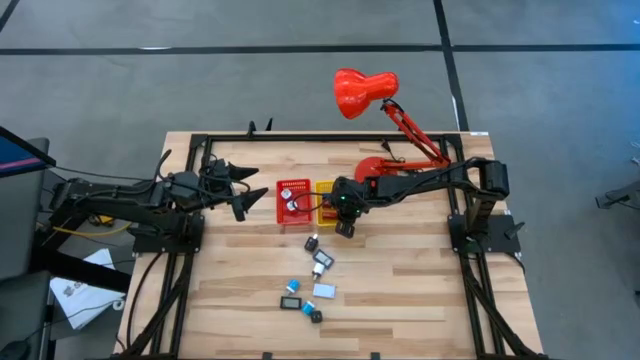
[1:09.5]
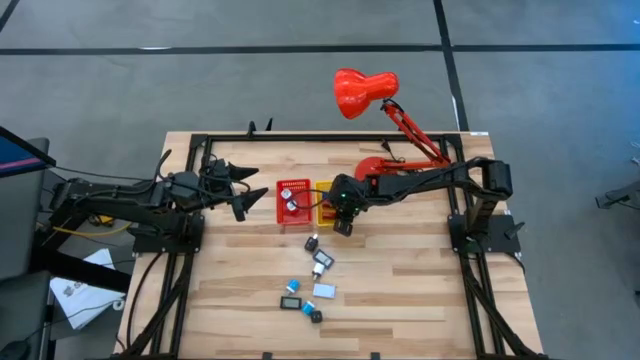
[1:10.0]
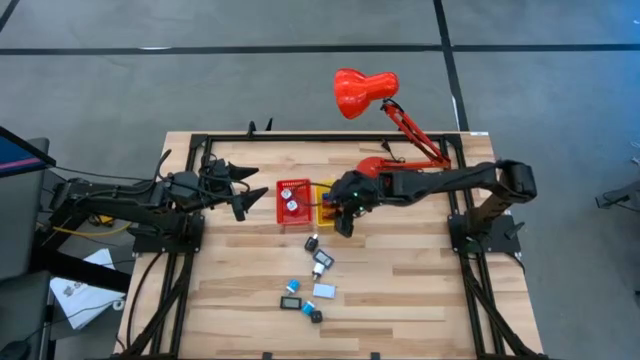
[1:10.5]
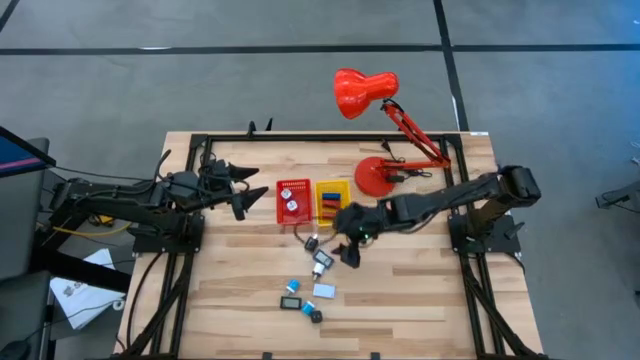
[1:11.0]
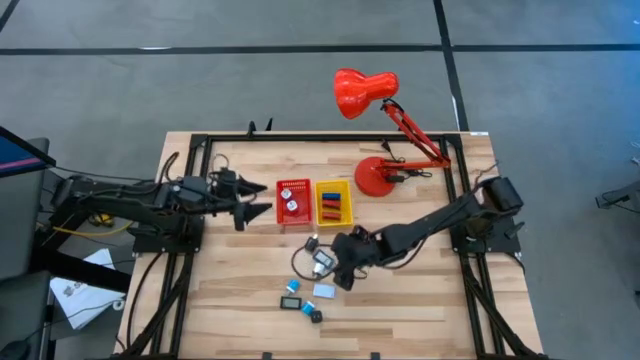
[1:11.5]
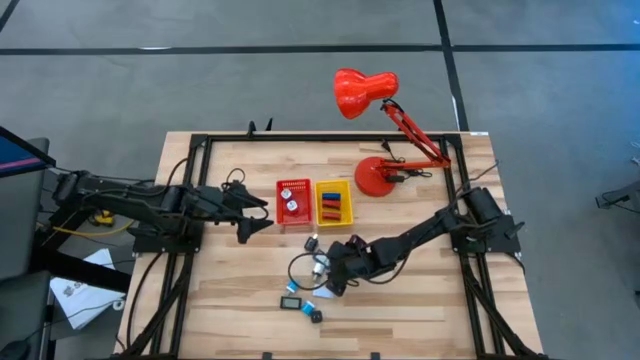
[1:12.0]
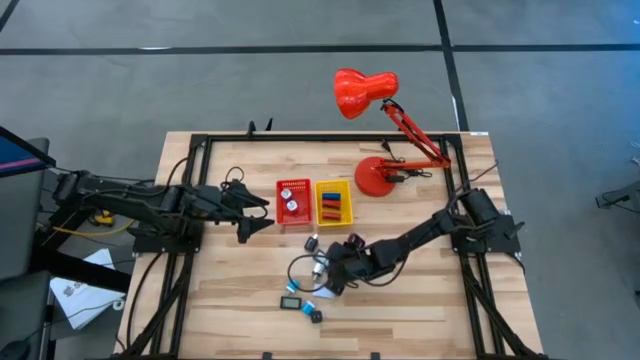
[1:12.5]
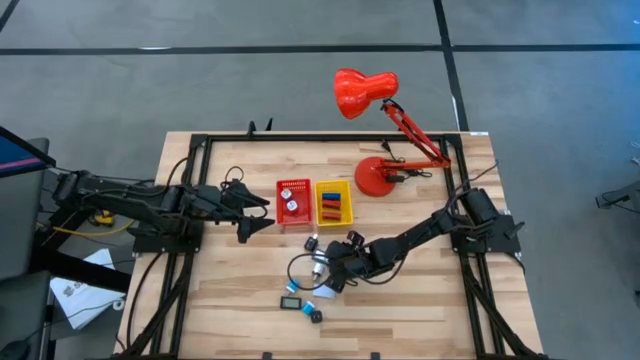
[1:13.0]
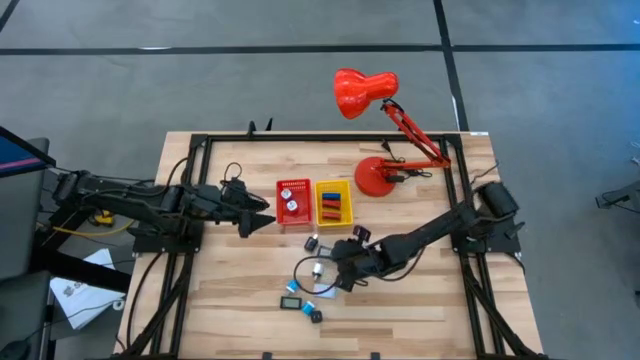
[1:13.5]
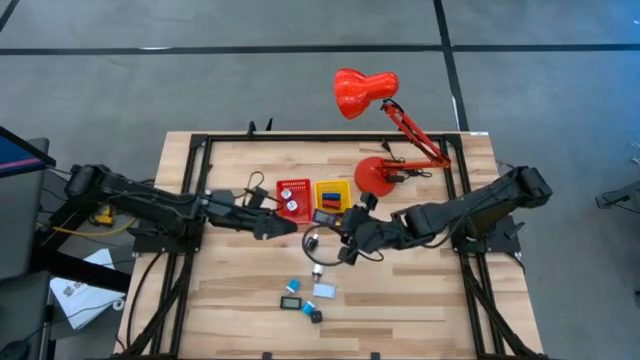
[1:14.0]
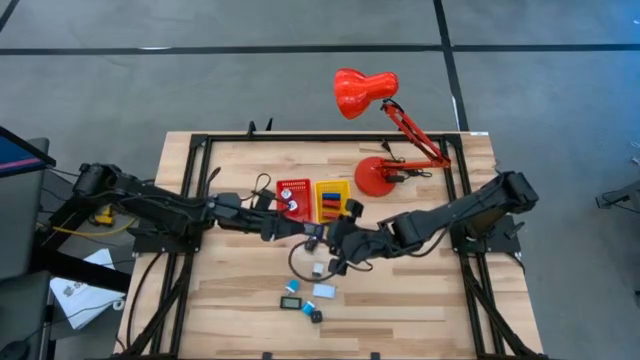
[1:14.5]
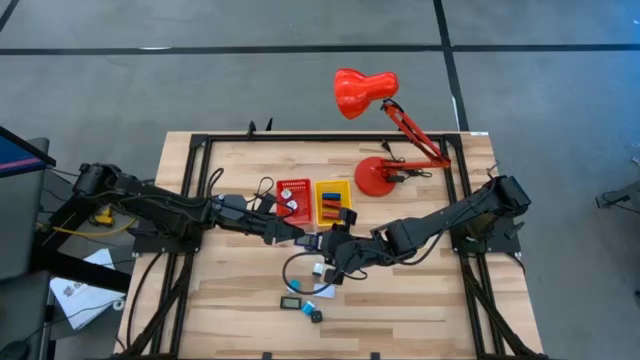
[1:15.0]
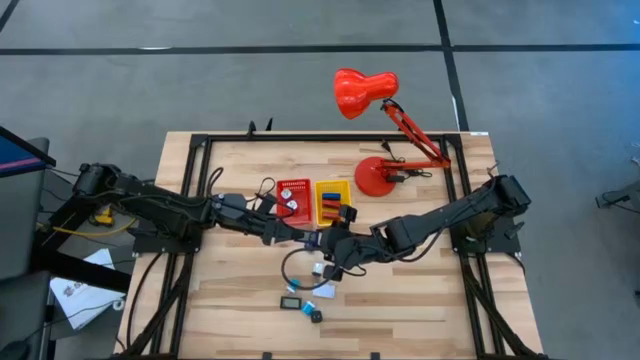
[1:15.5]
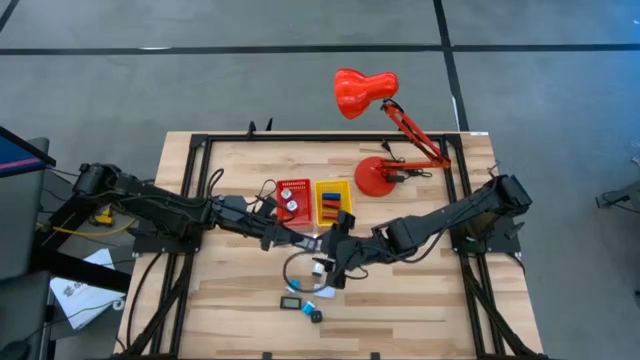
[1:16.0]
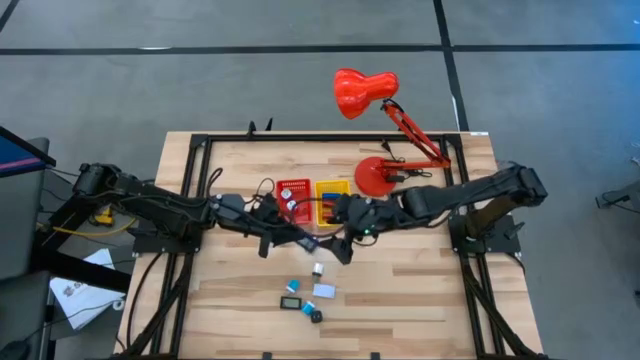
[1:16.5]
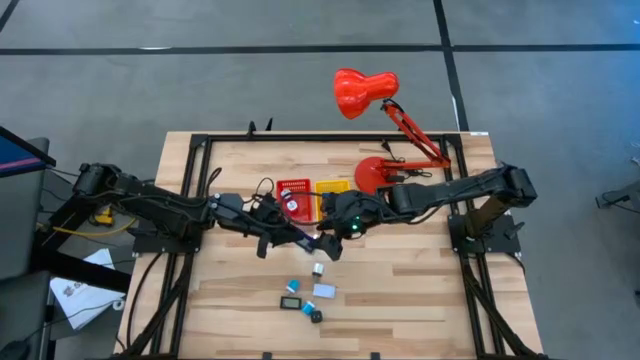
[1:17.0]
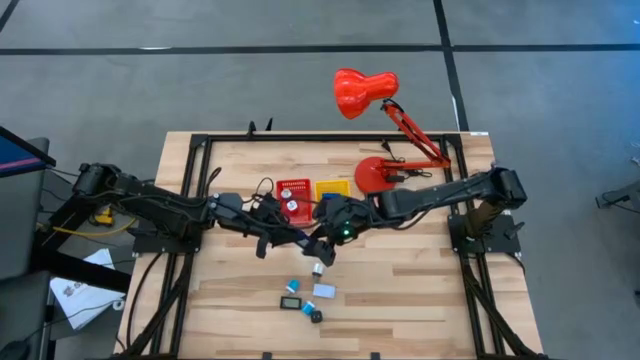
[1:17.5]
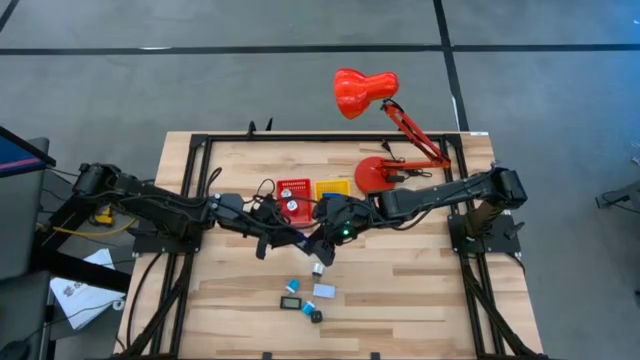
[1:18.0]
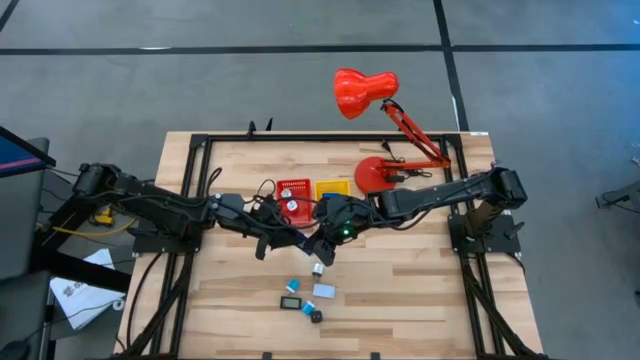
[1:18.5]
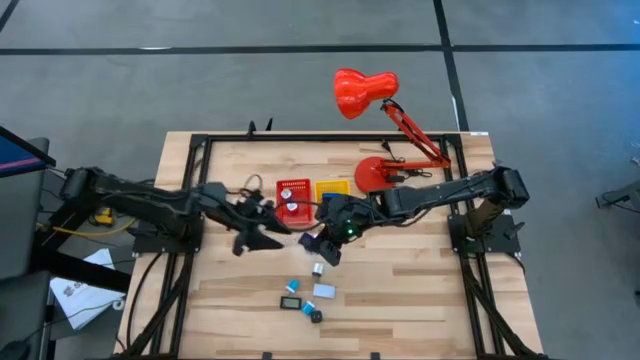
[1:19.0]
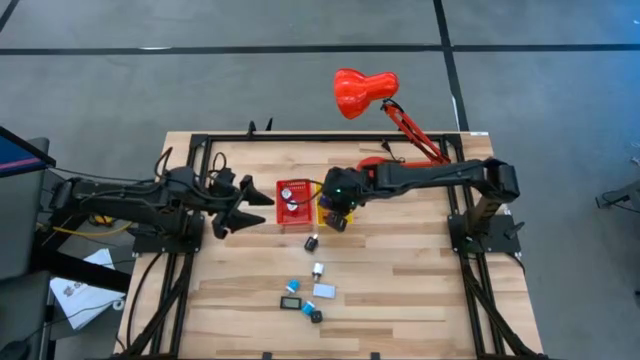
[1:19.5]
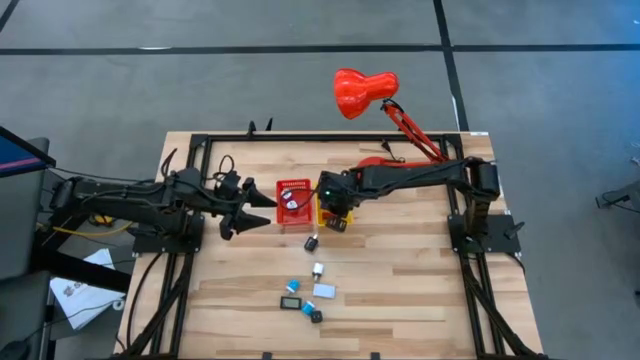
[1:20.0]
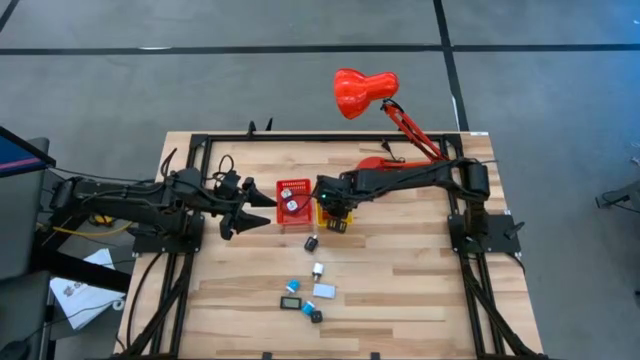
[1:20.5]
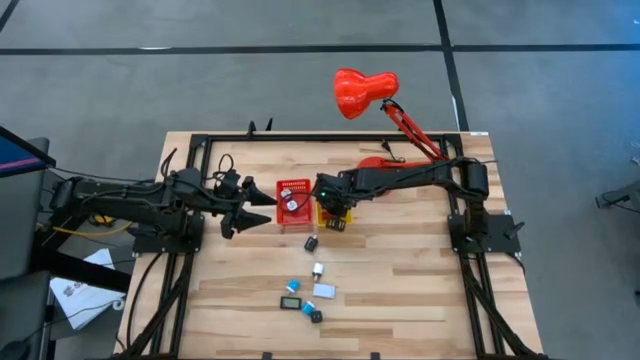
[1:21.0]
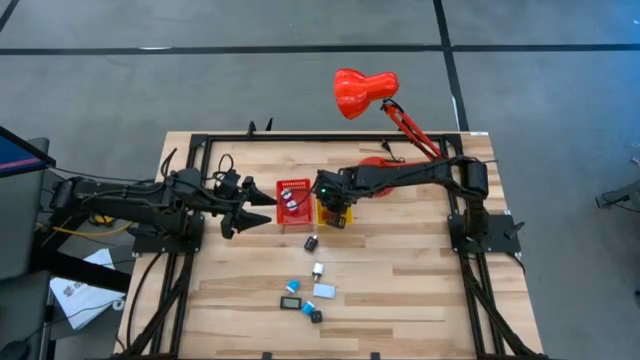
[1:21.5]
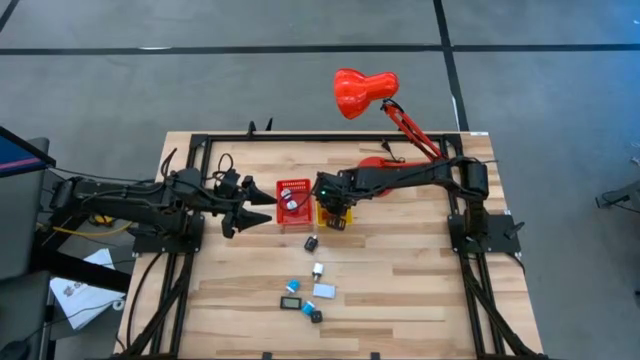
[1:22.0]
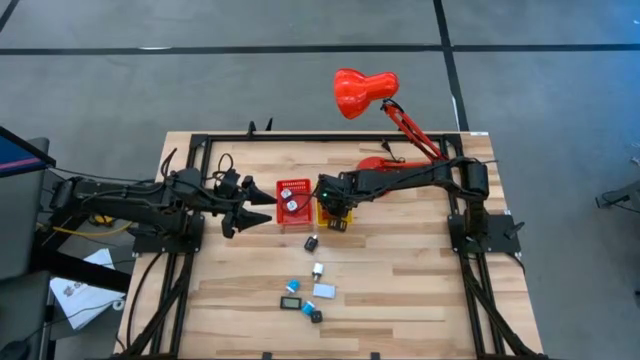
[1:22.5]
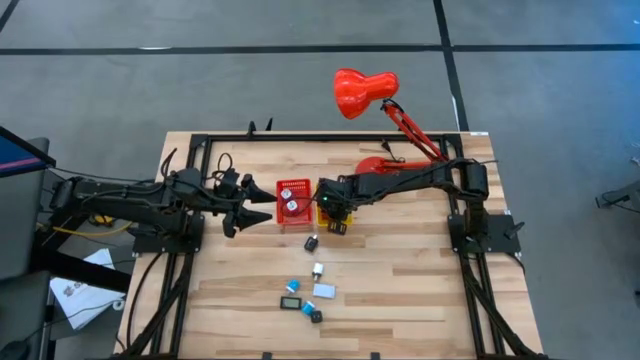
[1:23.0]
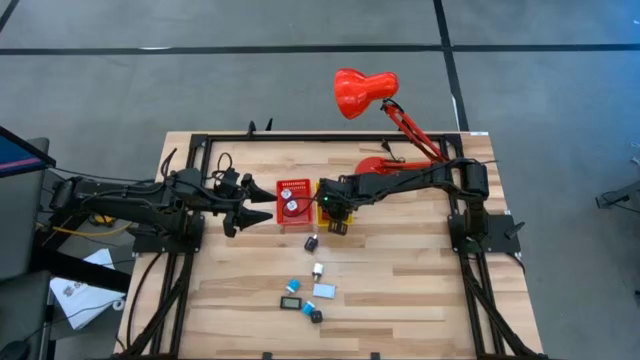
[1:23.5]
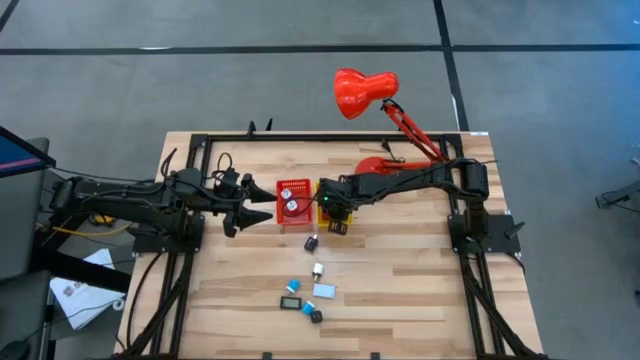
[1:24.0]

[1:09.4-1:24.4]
Task: Pick & Place Office items
Put the blue digital timer into the yellow basket

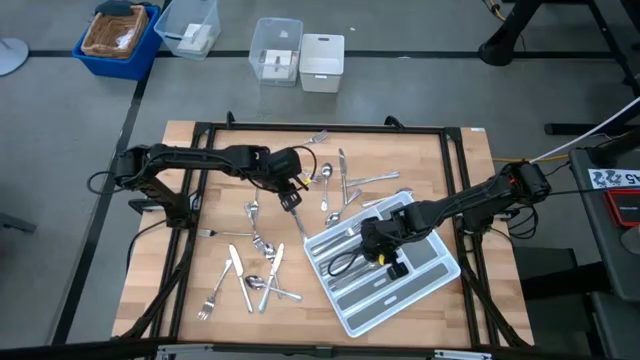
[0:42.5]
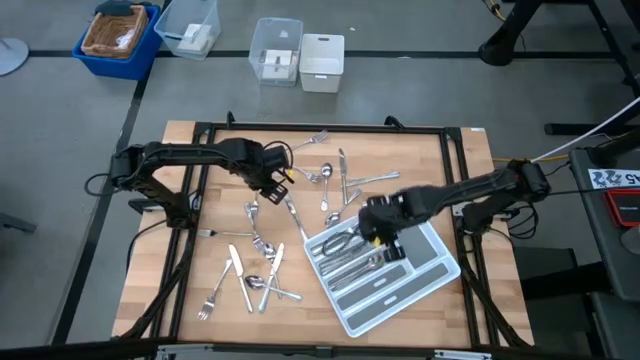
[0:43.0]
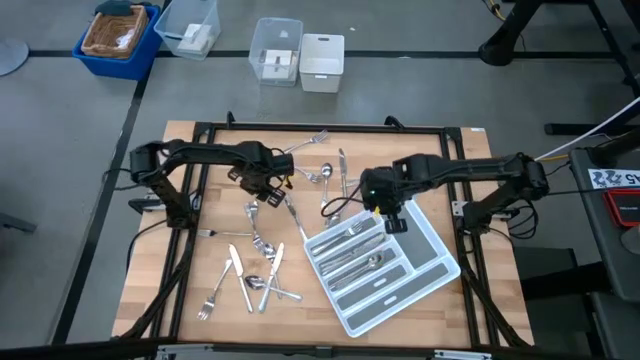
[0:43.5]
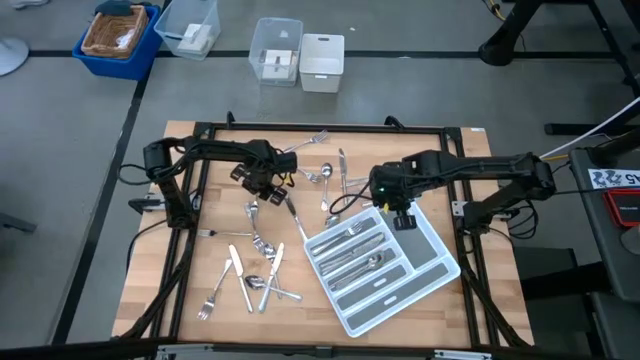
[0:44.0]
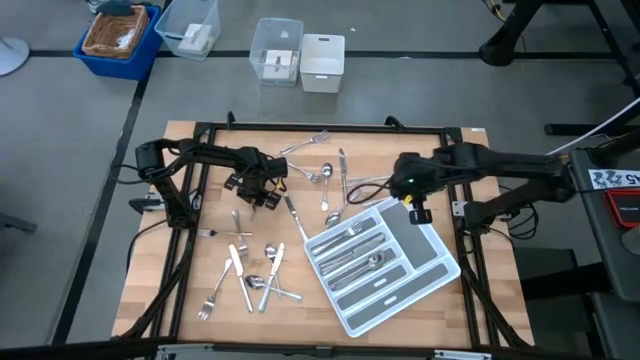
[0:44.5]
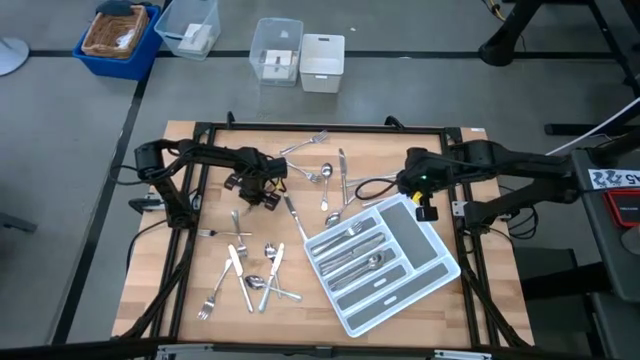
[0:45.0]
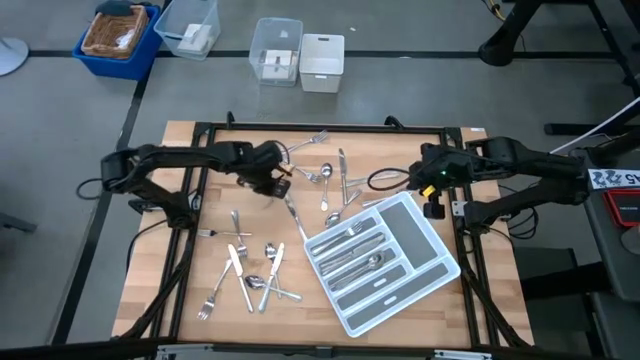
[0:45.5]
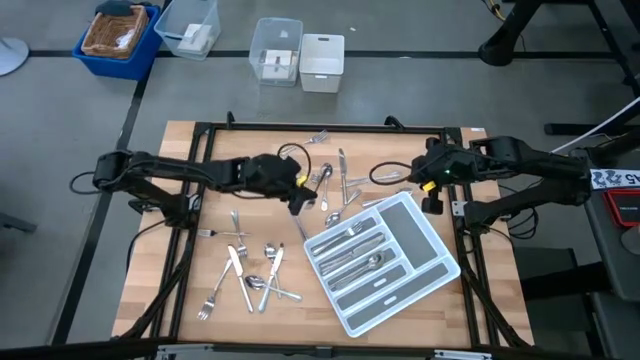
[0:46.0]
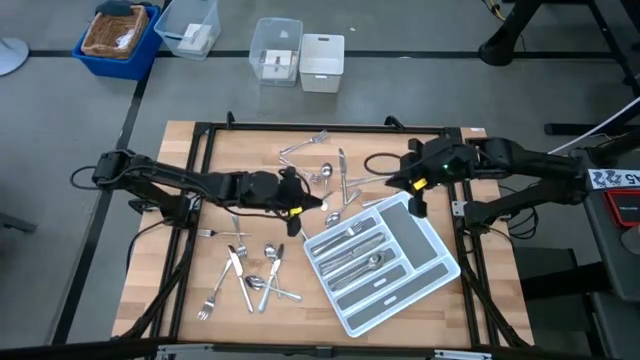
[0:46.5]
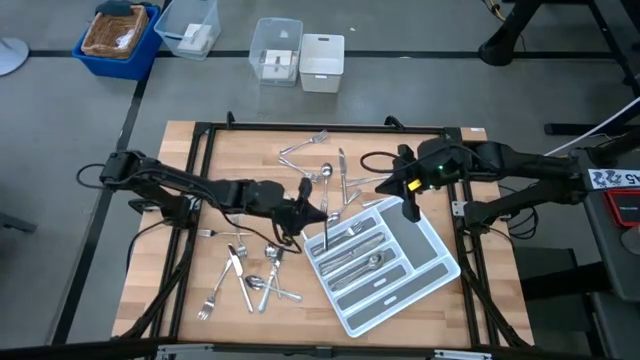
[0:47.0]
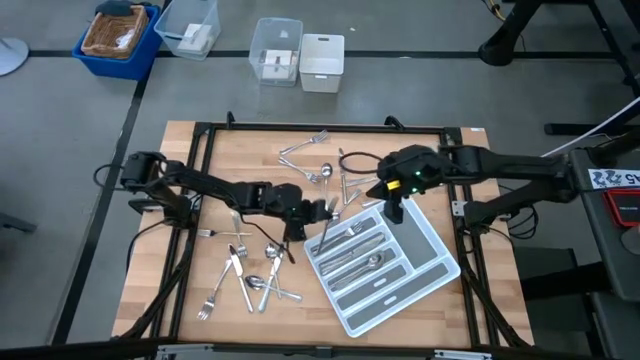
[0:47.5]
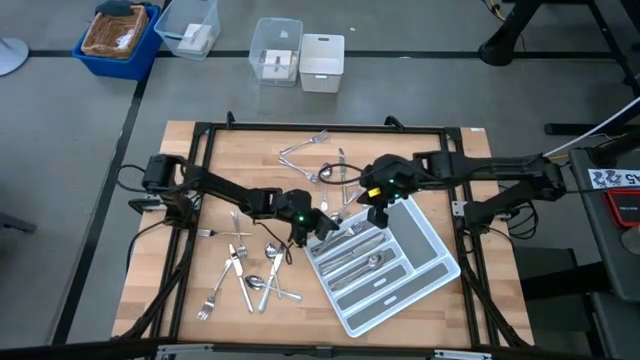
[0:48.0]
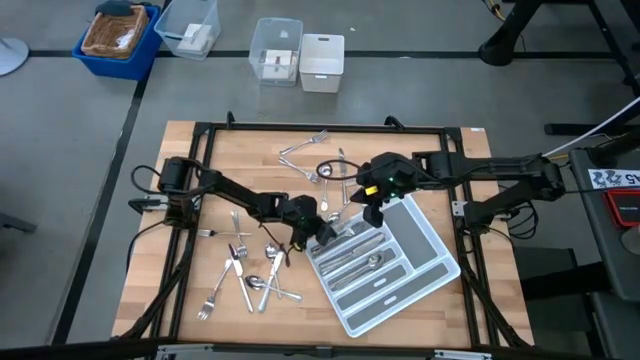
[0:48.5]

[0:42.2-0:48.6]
Task: Sort silverware
Put the silver fork into the silverware tray
